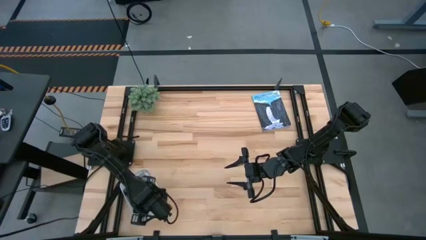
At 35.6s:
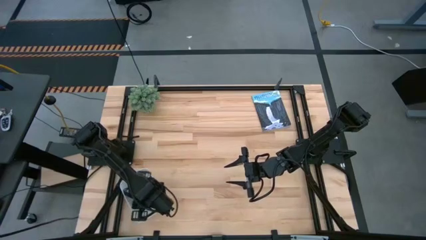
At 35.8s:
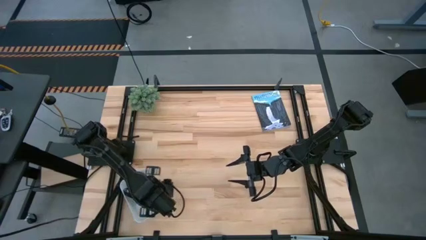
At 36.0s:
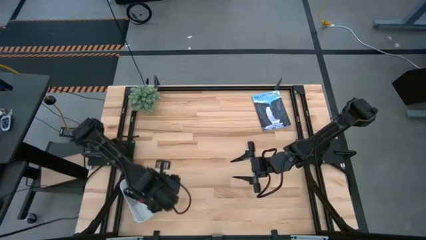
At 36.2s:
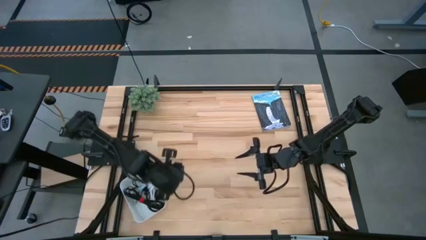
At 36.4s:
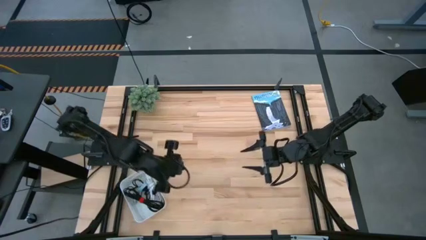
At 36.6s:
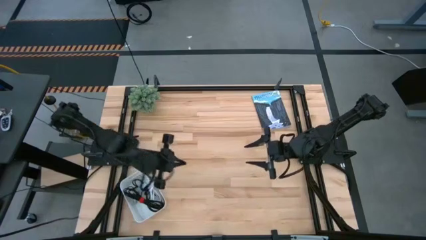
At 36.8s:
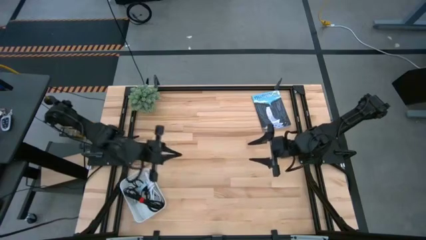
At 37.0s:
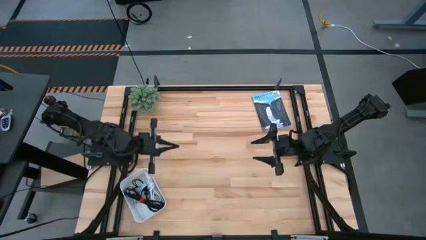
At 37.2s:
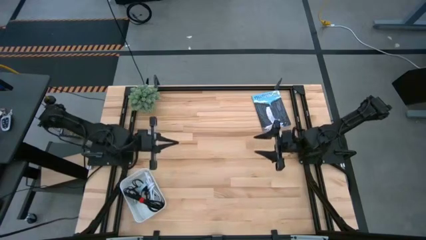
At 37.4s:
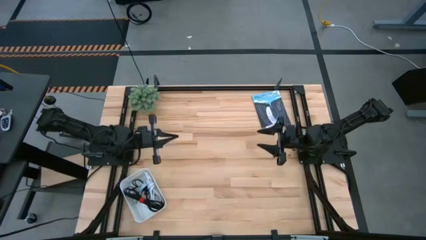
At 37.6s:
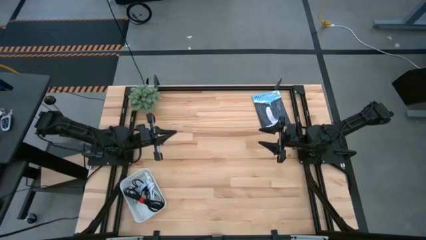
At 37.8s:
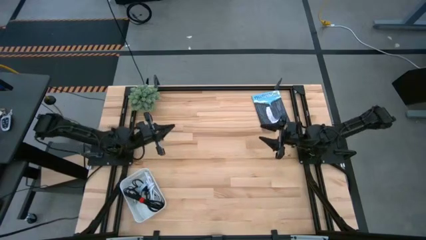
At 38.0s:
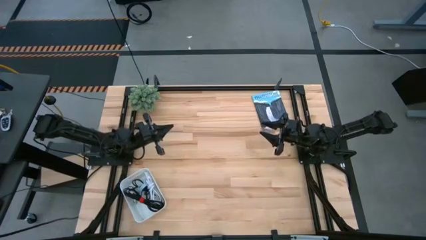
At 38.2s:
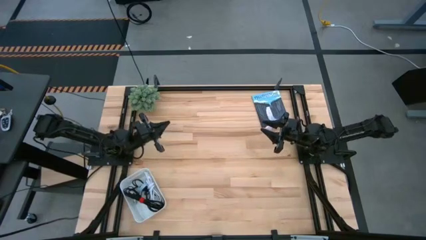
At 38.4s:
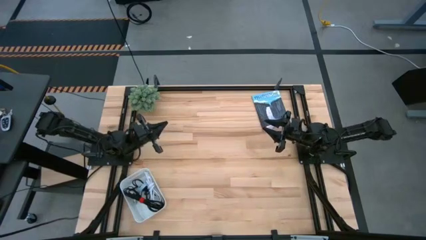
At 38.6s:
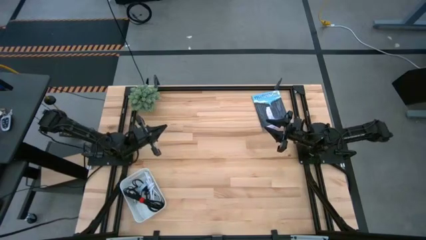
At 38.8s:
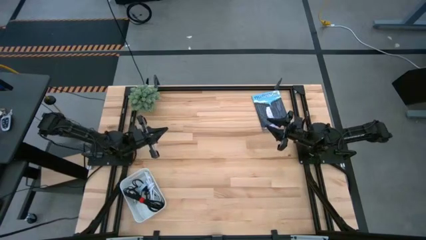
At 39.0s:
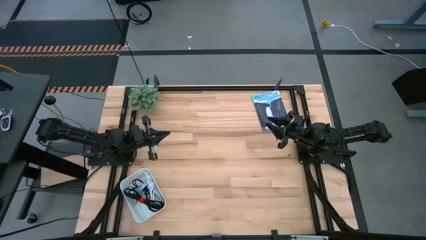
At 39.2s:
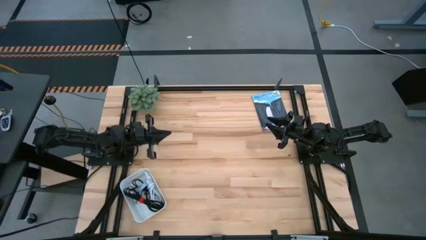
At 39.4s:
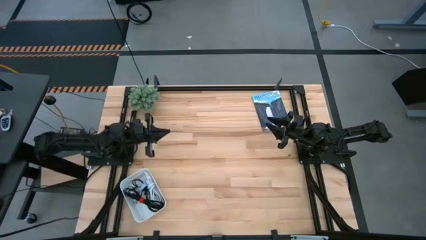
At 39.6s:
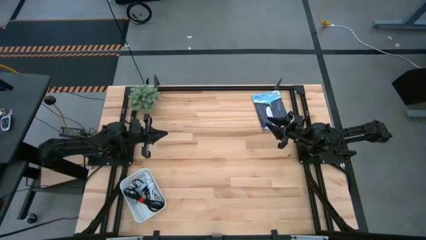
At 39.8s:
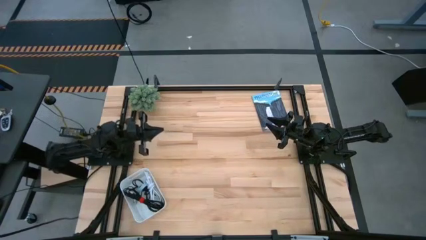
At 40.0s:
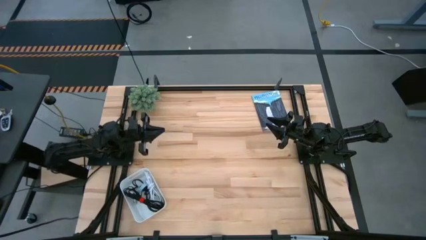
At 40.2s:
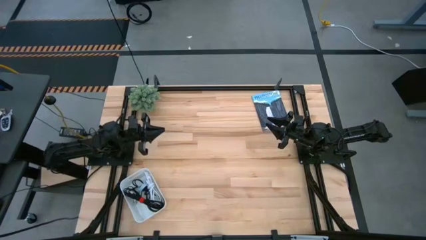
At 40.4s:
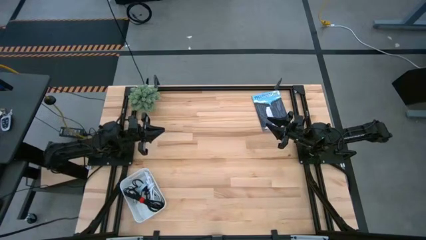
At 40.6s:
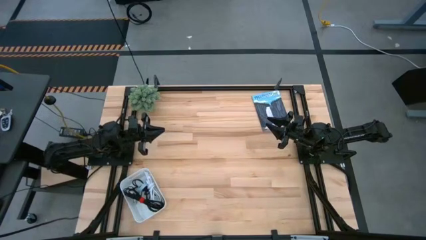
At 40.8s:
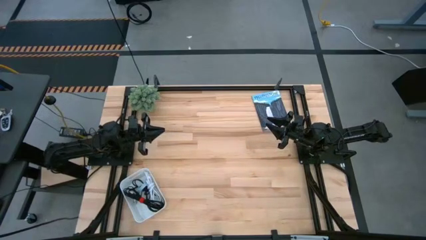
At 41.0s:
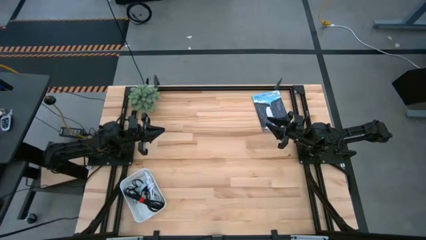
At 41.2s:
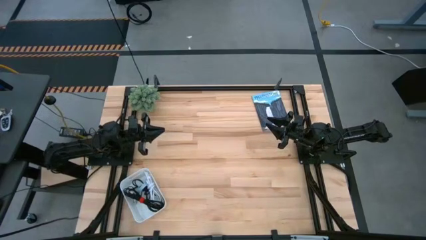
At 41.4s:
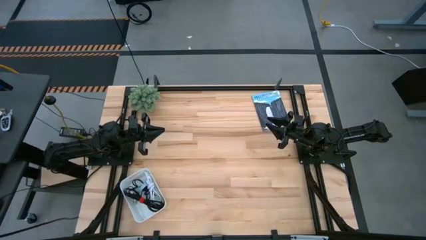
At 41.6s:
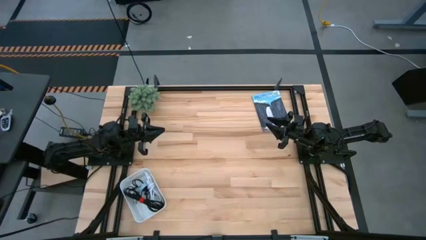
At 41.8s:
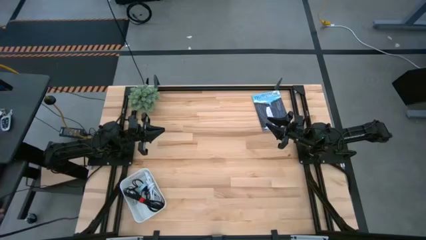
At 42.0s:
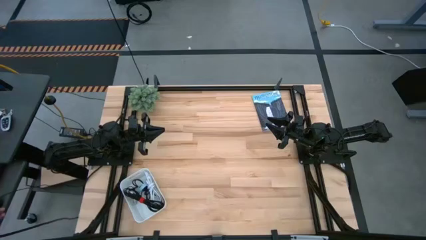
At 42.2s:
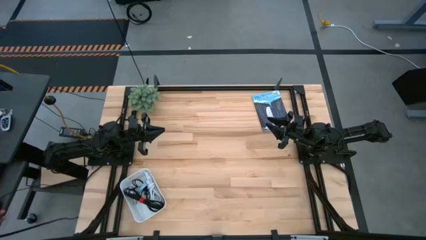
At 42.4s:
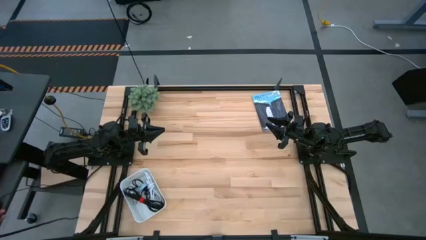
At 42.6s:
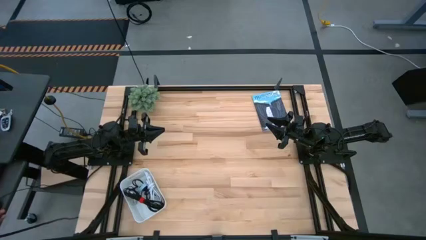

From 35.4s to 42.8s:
Task: Pick and place USB-C Cables
Return to Home Position

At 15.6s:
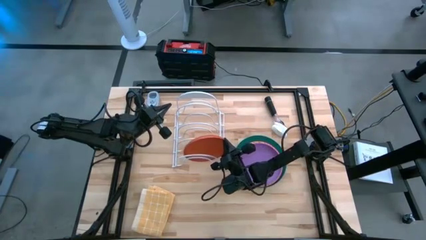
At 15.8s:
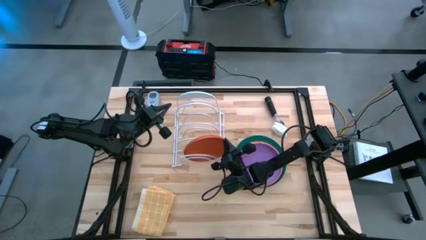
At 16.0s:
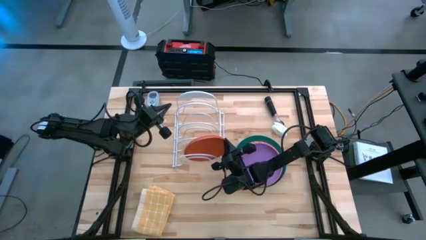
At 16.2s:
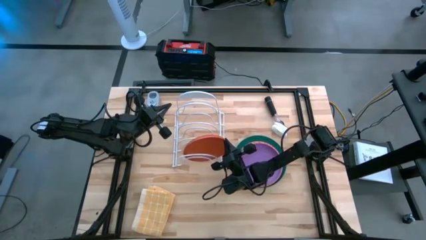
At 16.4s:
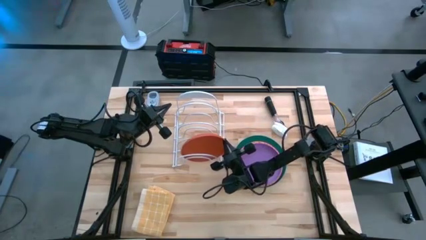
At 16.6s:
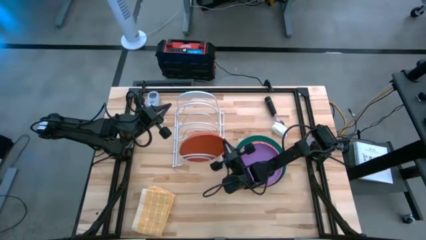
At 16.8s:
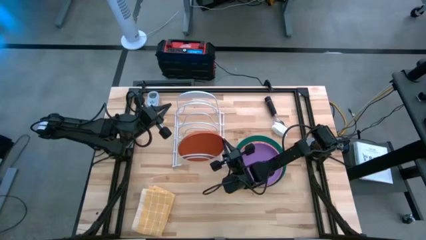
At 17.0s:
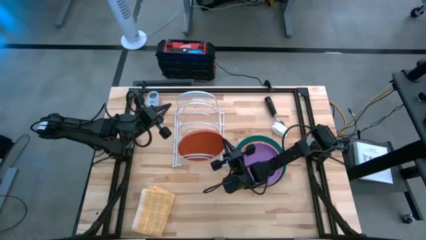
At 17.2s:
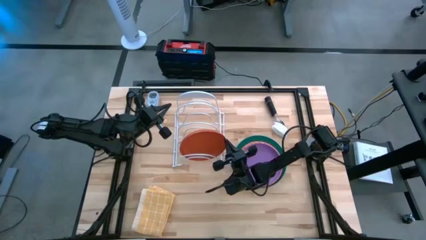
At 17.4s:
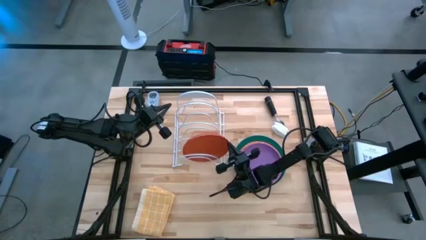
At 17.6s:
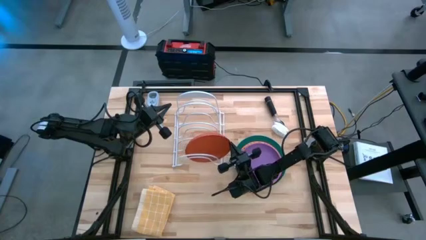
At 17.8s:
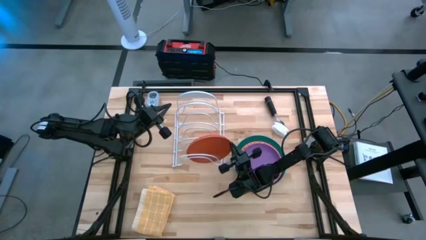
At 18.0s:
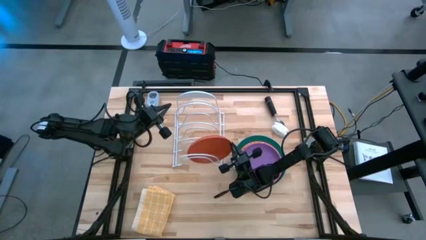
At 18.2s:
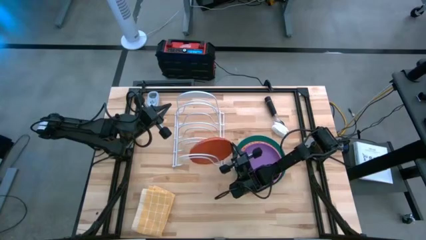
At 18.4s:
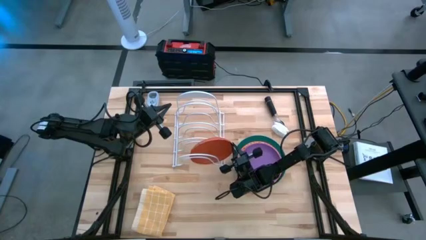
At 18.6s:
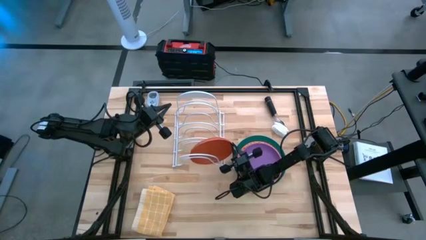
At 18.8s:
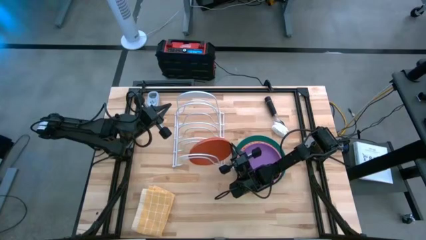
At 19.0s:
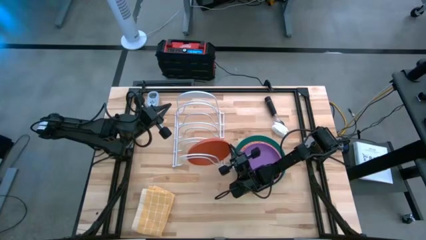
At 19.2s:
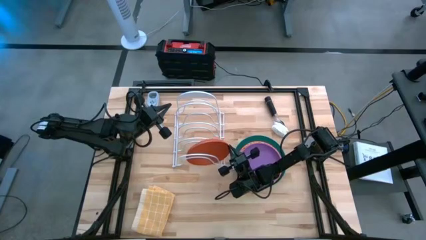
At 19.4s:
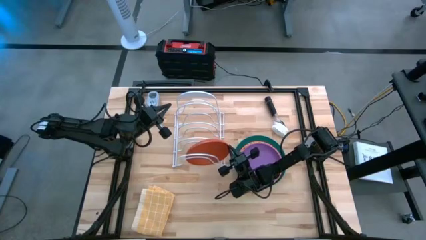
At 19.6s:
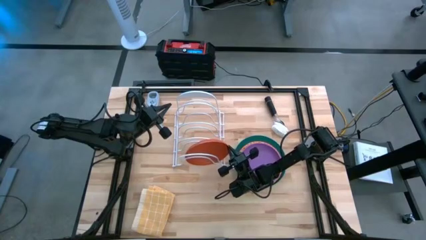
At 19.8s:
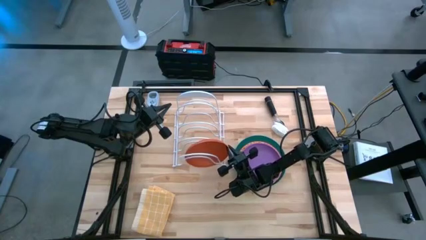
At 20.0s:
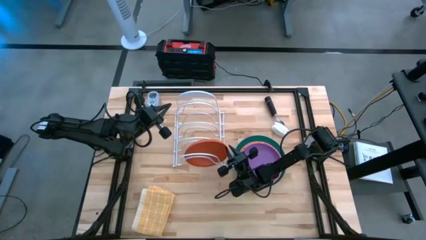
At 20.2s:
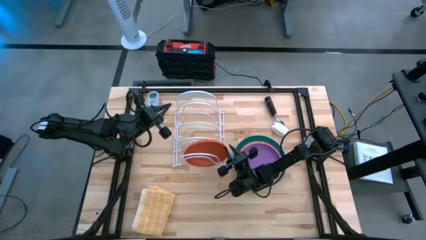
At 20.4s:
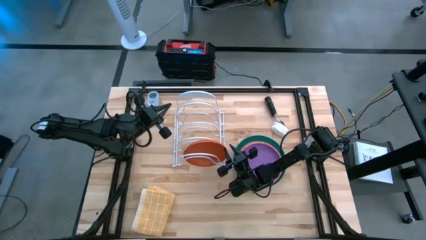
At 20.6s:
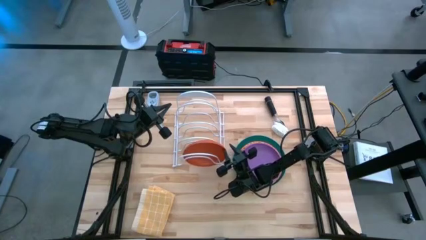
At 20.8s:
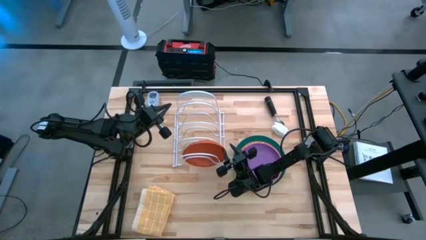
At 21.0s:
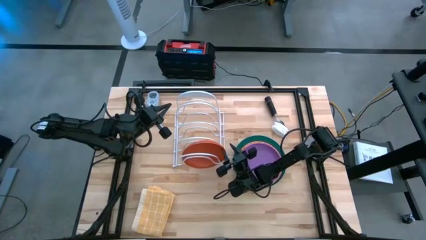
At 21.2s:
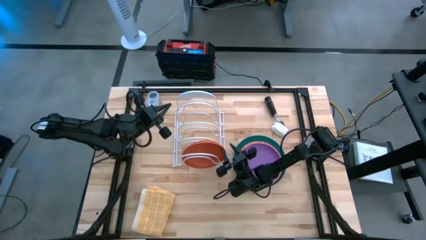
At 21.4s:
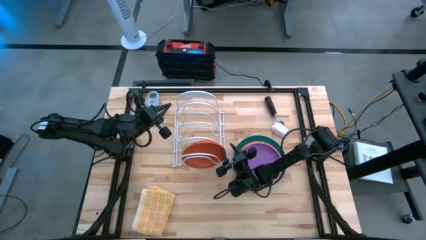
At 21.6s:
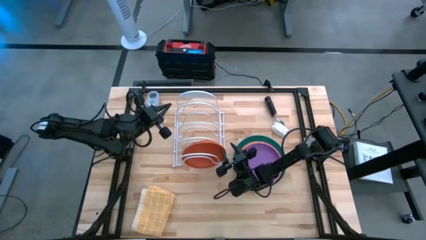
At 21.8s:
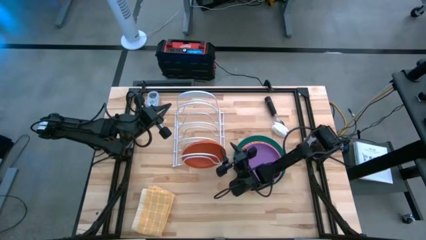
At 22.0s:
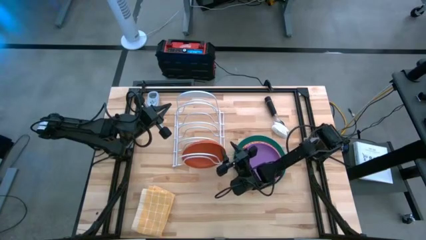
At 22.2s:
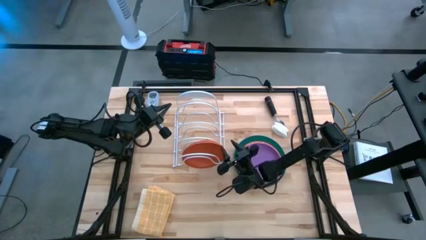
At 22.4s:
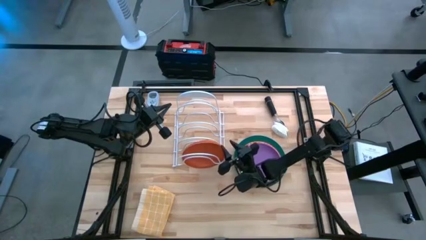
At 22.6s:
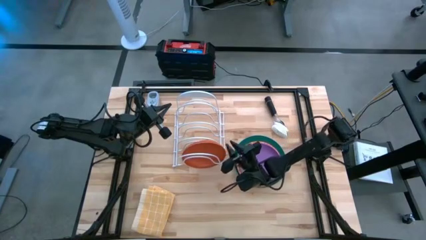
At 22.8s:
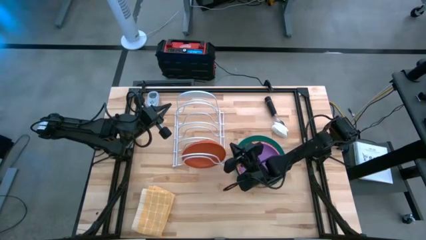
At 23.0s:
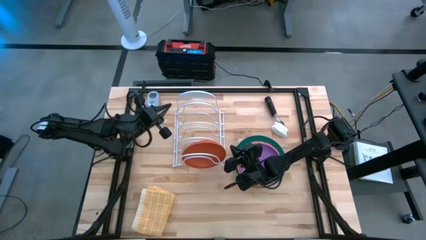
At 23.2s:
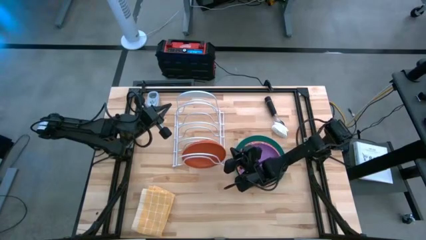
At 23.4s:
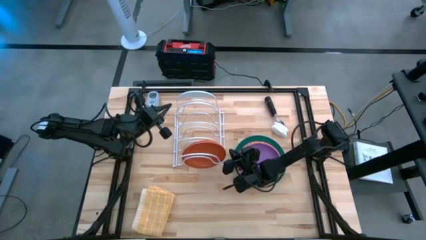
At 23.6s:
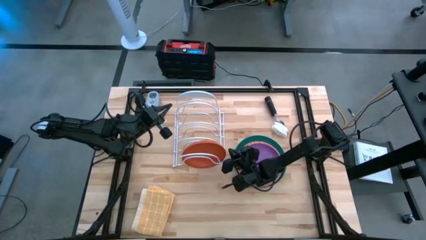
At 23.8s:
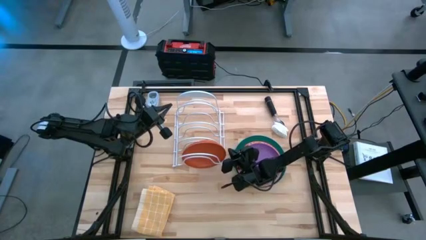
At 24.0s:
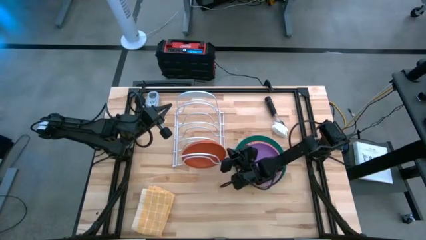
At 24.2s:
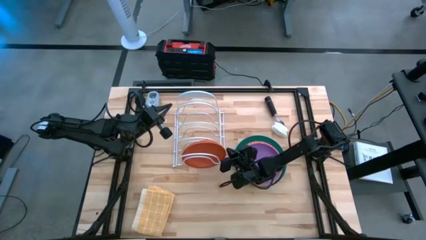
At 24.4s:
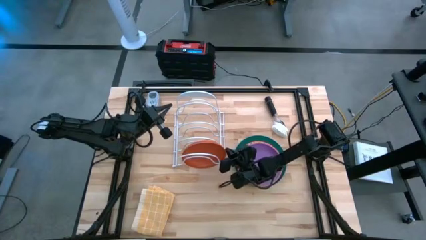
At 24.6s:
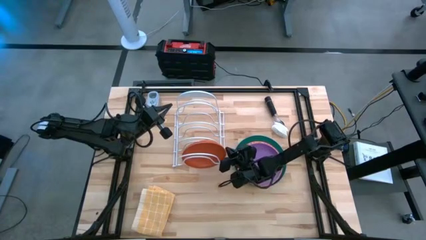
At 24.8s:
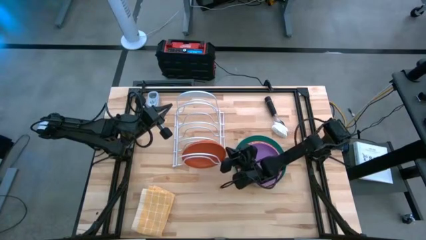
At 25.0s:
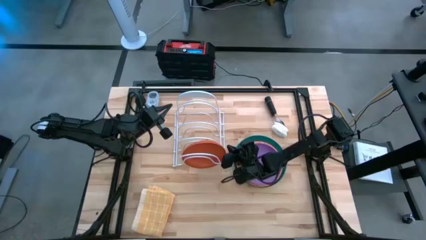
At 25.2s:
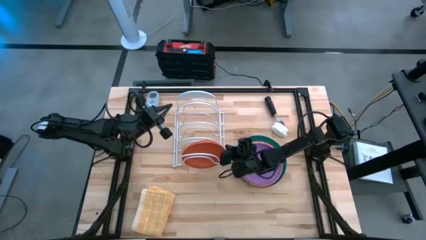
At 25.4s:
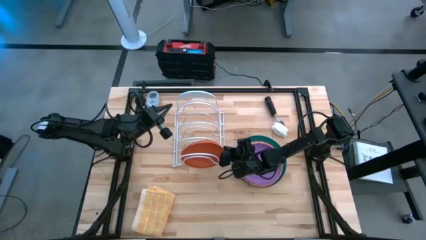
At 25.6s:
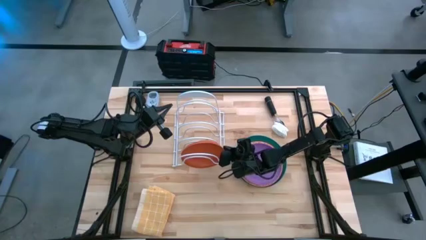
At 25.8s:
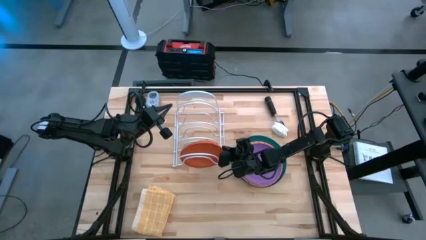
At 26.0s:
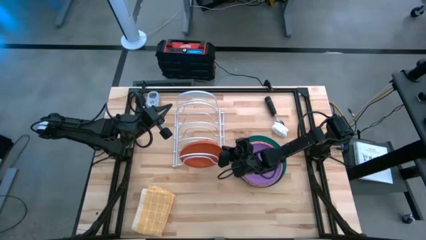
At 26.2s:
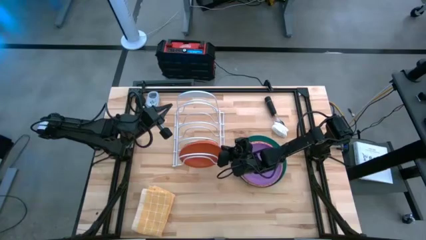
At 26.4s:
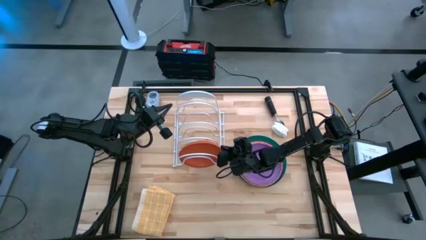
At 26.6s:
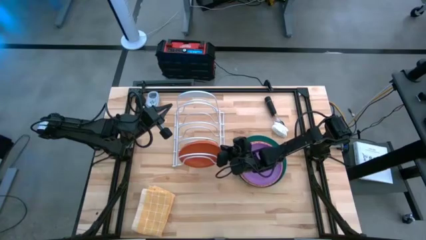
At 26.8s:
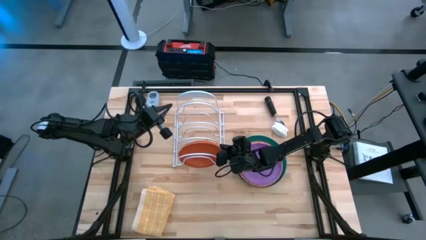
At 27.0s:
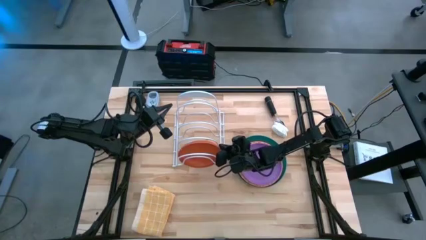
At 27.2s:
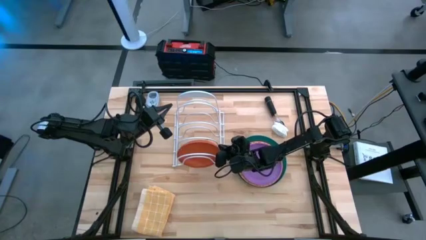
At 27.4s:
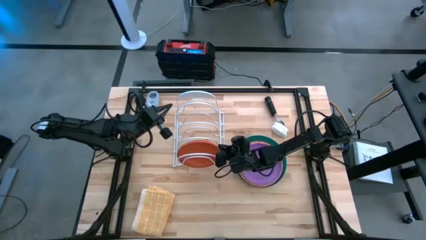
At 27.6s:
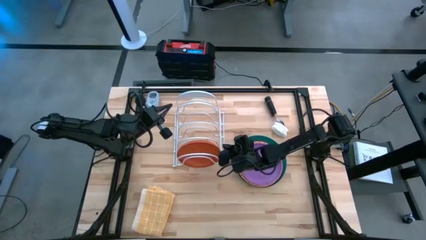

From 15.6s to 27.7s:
Task: Sort dishes
Put the orange plate into the dish rack
